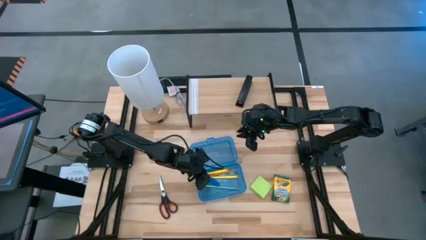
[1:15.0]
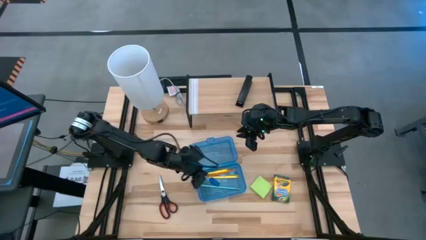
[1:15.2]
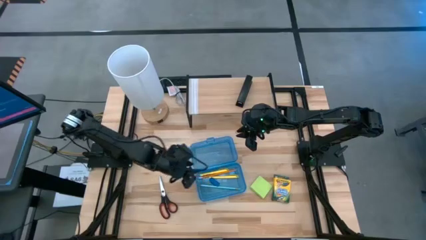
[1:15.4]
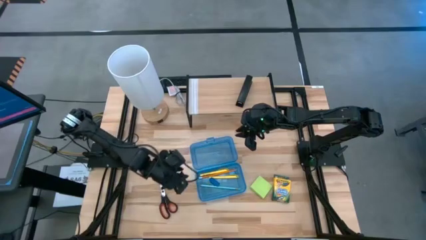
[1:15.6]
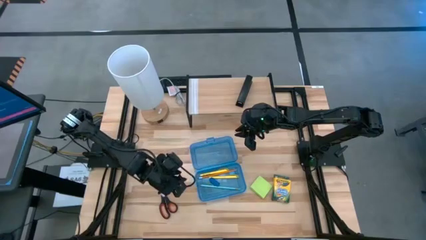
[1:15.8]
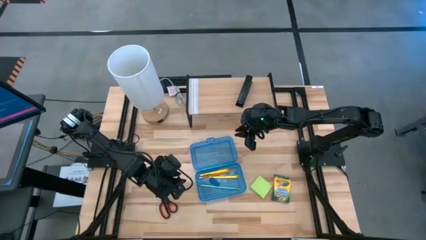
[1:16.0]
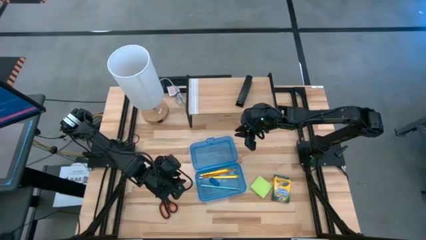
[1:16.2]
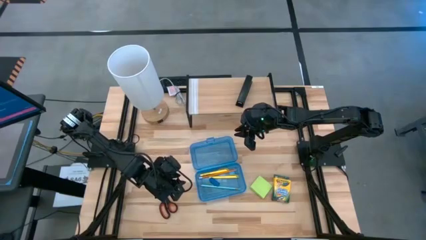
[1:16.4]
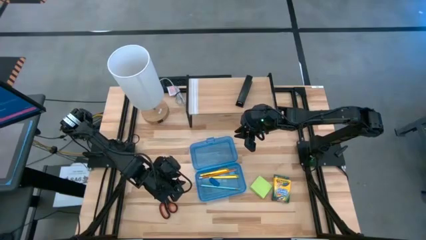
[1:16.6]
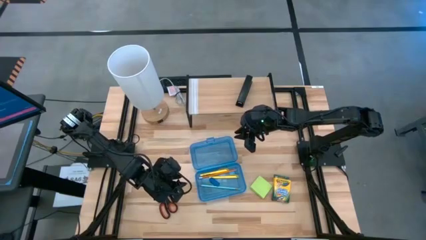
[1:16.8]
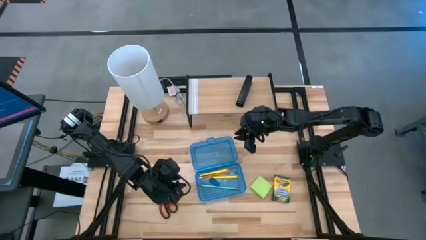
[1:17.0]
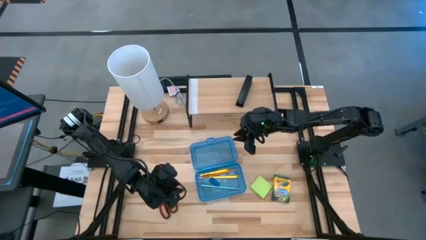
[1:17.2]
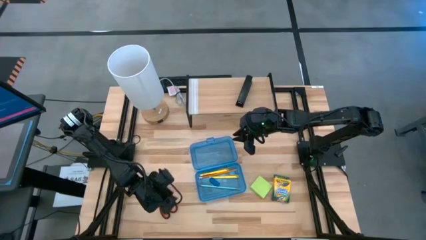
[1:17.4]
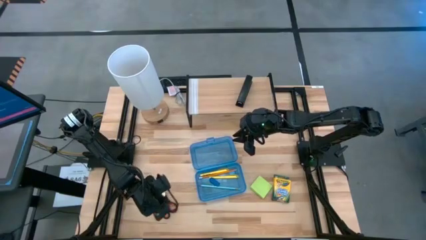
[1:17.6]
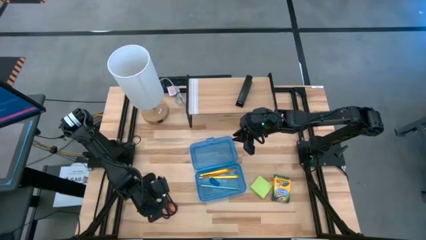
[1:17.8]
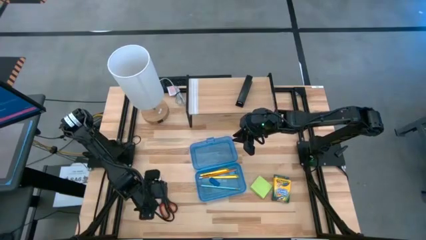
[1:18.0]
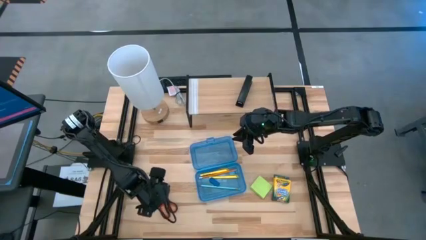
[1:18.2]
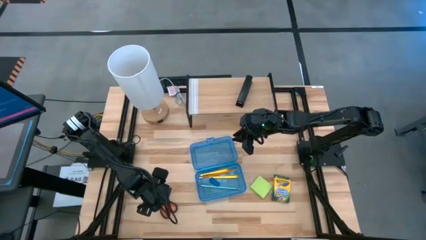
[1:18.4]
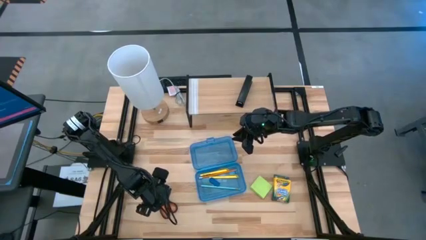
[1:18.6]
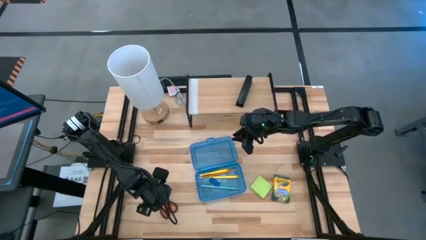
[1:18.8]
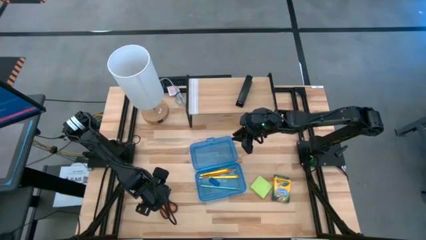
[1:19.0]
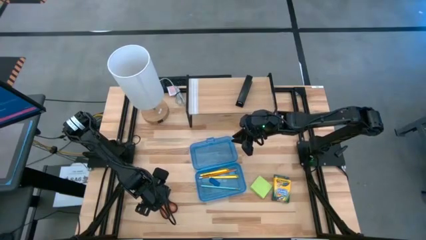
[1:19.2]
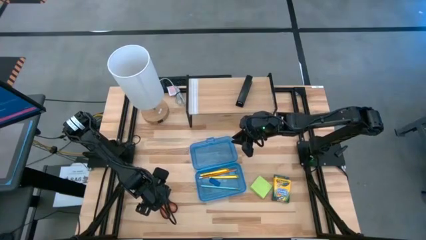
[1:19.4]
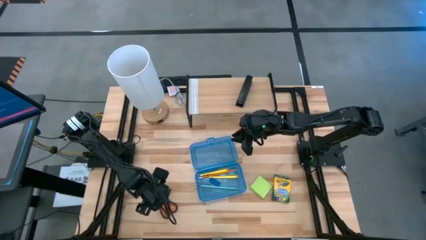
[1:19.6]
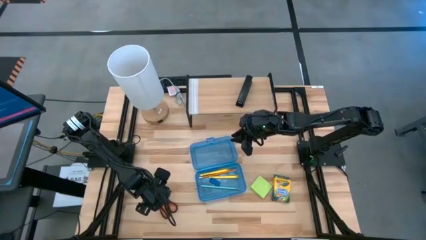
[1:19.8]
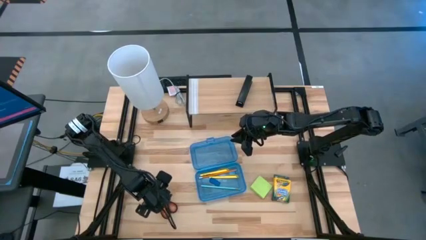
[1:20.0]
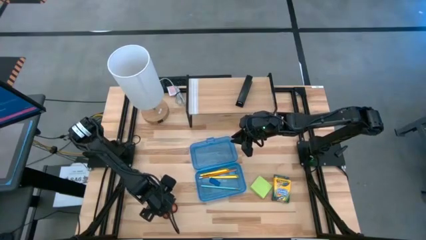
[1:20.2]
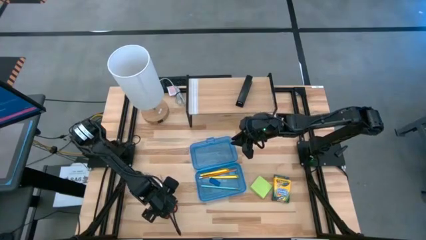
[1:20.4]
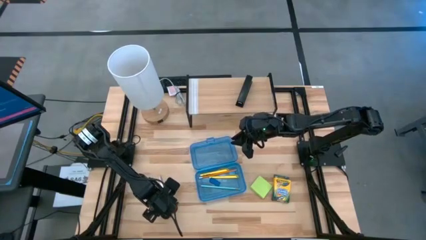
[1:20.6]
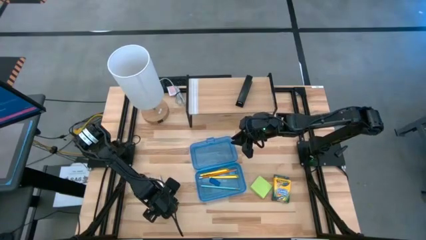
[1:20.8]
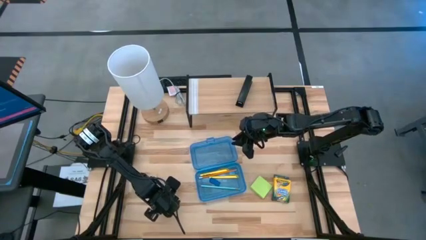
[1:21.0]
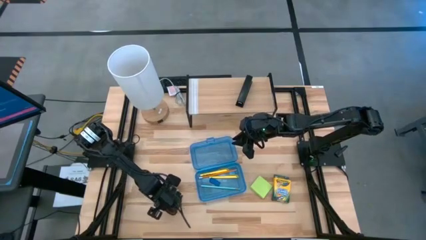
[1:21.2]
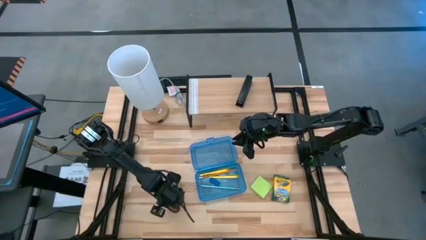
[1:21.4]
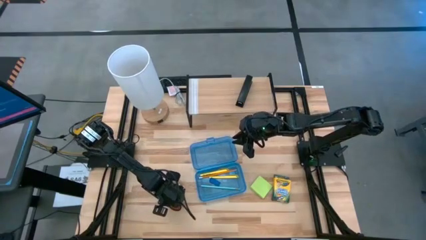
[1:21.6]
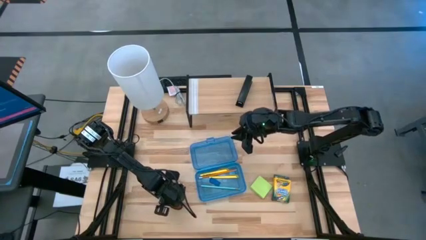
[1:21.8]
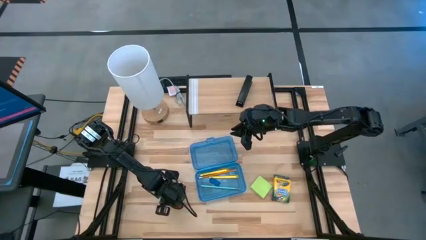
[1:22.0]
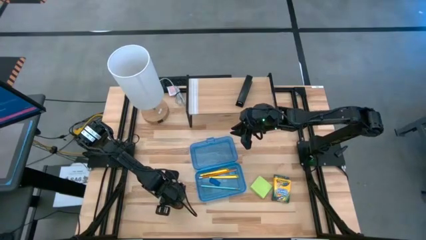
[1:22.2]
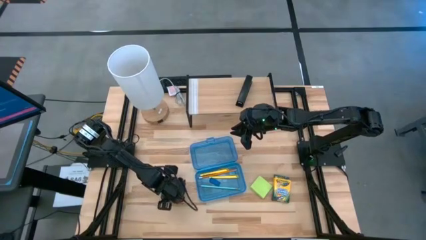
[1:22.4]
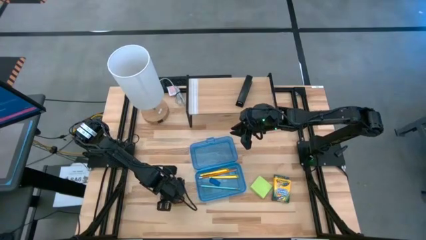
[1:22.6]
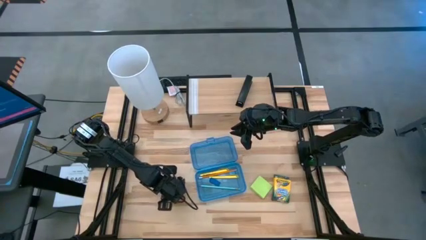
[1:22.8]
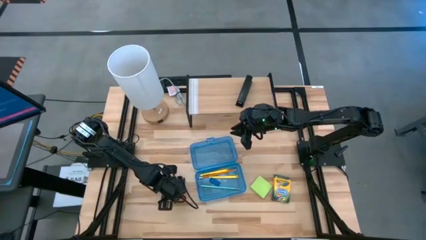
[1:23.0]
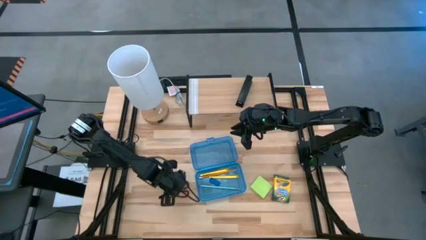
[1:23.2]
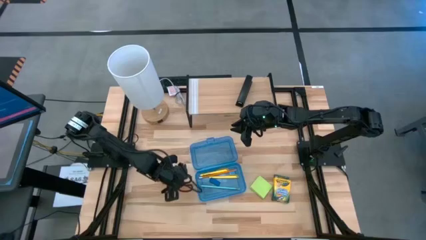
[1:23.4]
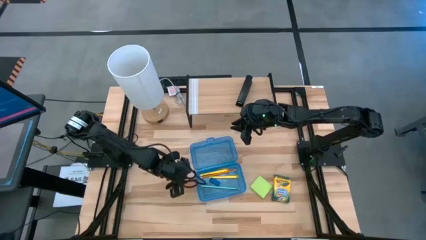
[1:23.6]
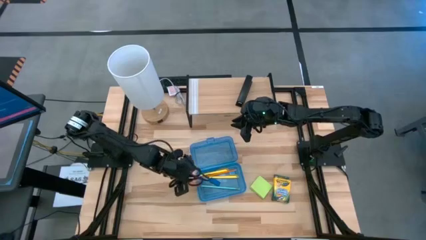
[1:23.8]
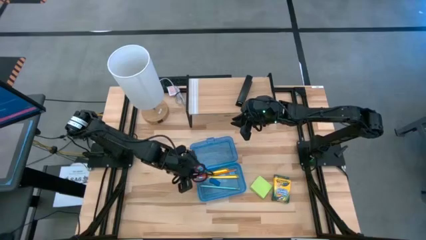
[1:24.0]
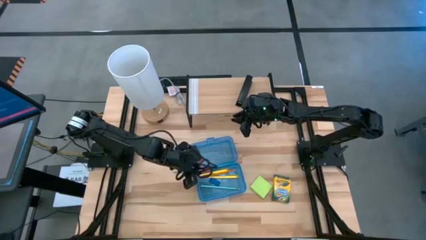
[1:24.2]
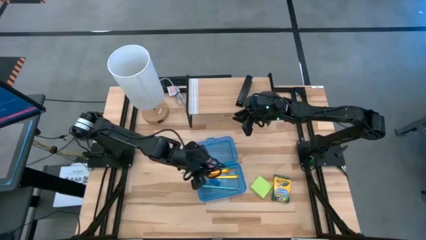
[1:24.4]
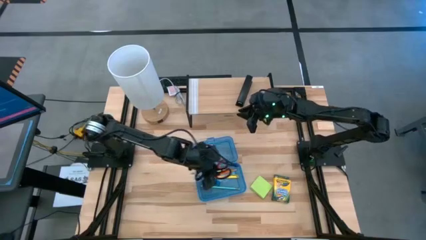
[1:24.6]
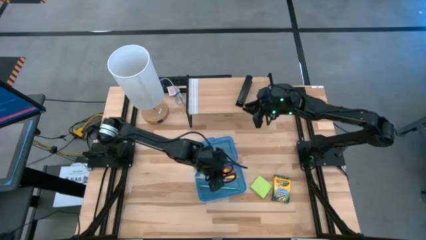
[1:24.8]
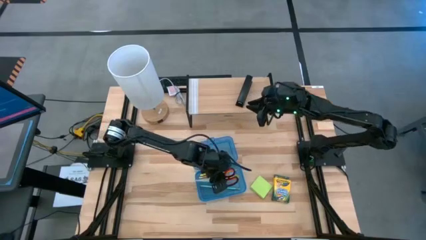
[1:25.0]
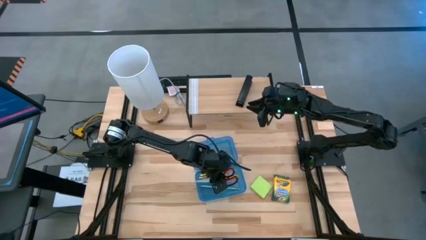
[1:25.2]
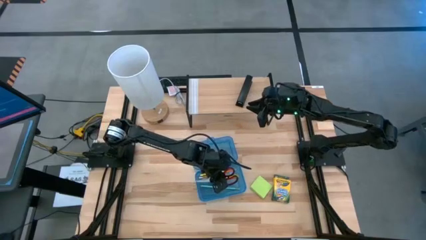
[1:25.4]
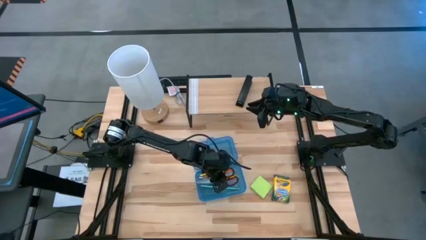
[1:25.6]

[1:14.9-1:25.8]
Task: Pack school essentials
Put the black and silver scissors into the blue supply box

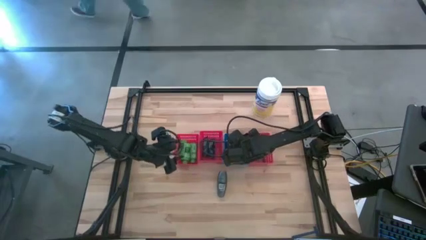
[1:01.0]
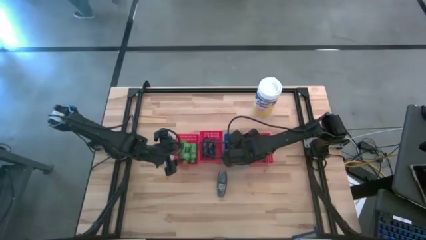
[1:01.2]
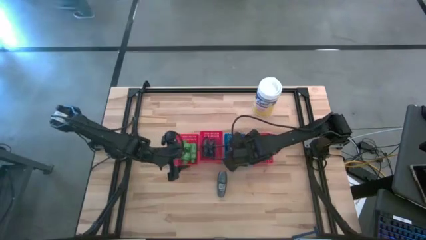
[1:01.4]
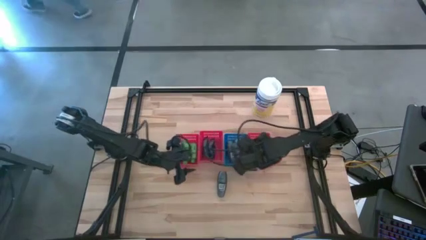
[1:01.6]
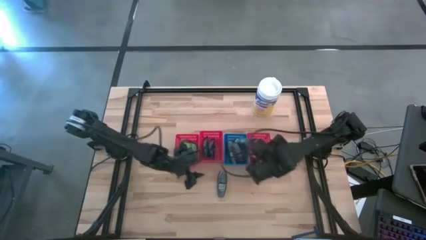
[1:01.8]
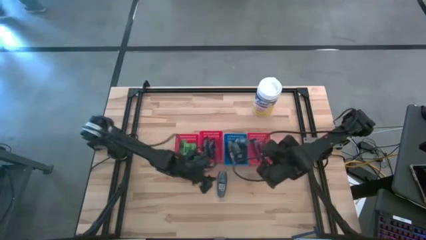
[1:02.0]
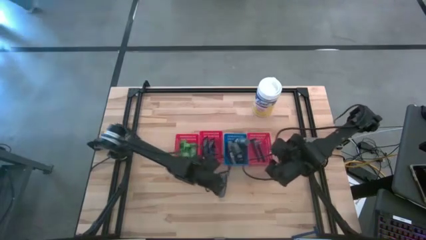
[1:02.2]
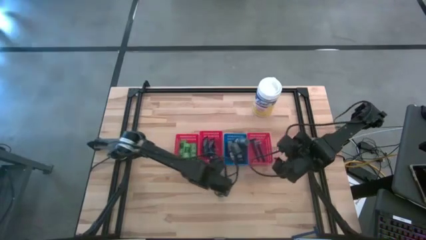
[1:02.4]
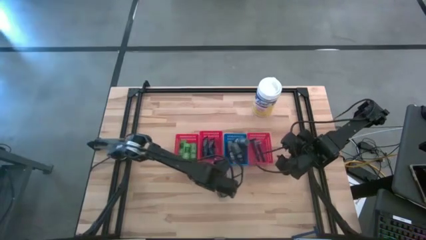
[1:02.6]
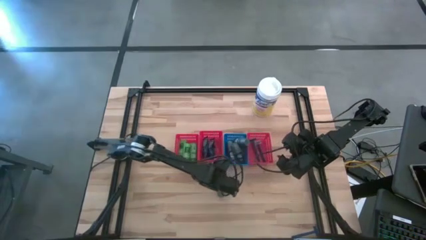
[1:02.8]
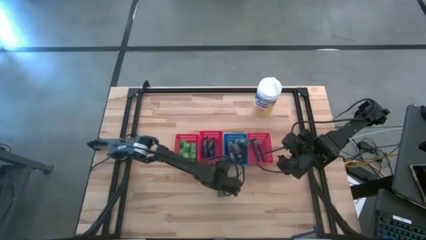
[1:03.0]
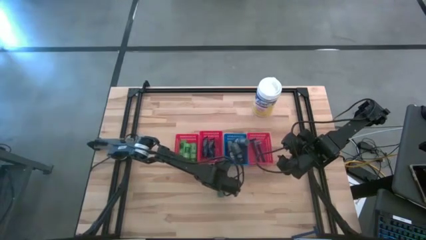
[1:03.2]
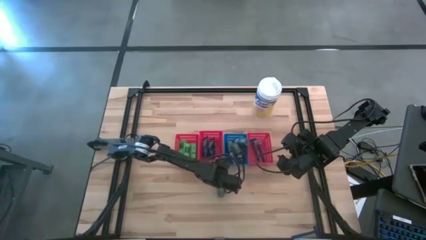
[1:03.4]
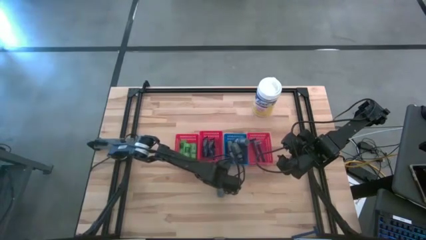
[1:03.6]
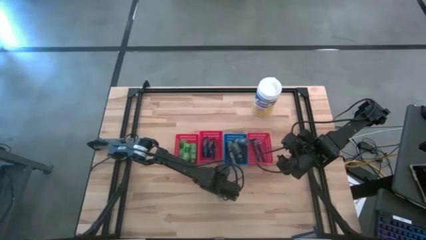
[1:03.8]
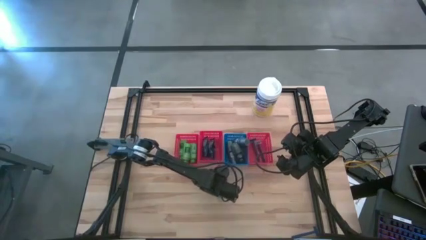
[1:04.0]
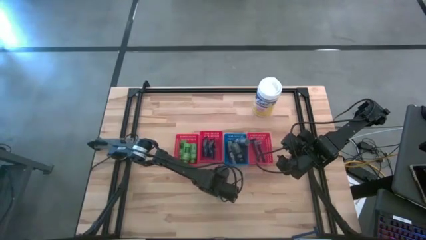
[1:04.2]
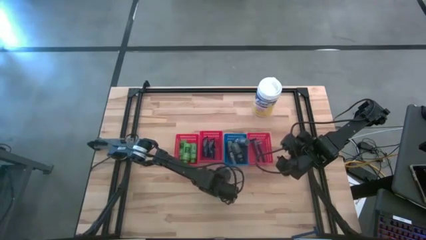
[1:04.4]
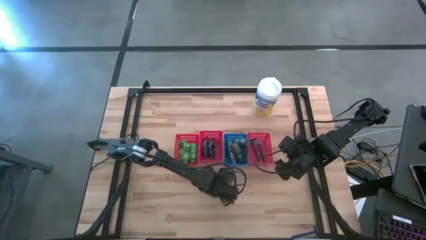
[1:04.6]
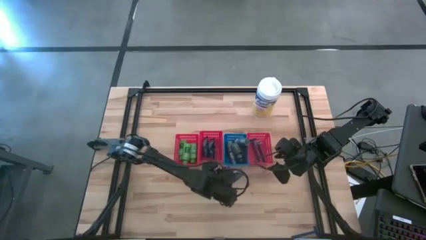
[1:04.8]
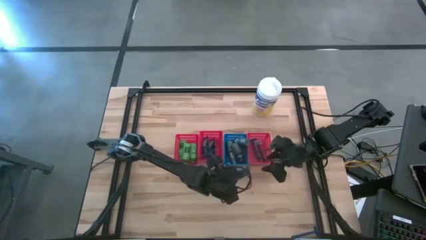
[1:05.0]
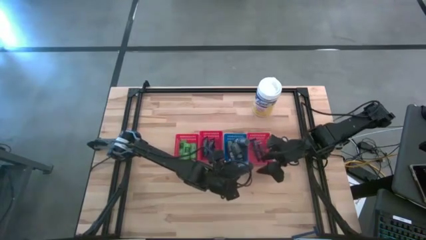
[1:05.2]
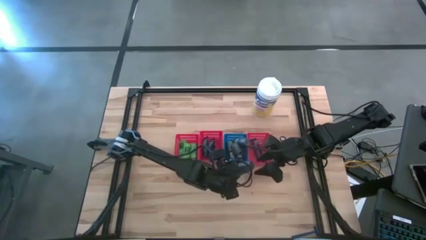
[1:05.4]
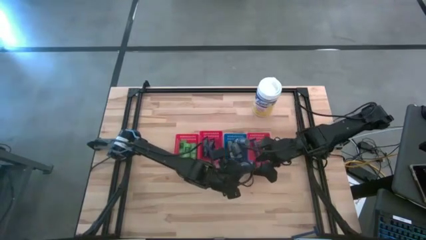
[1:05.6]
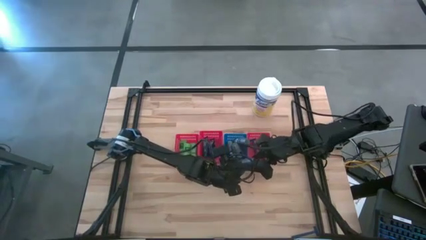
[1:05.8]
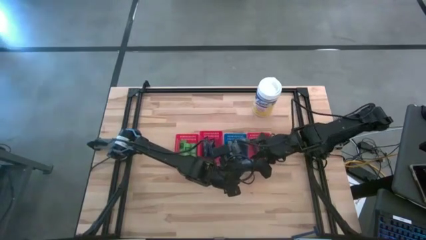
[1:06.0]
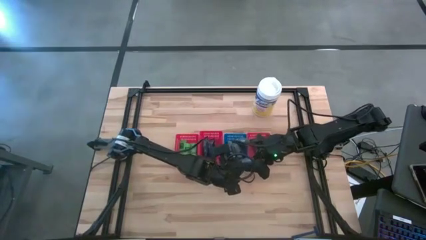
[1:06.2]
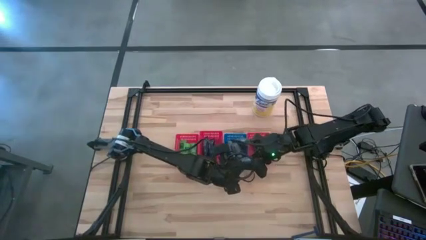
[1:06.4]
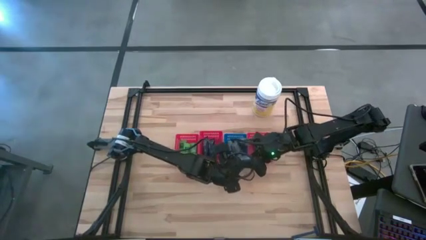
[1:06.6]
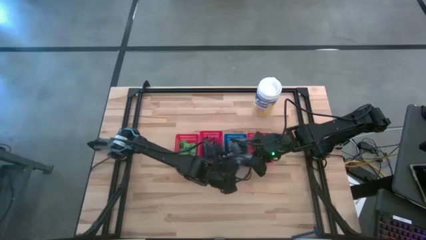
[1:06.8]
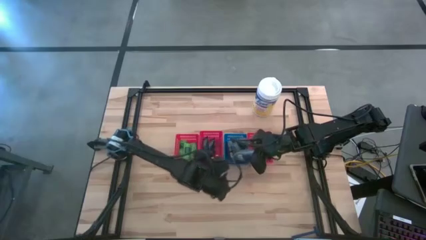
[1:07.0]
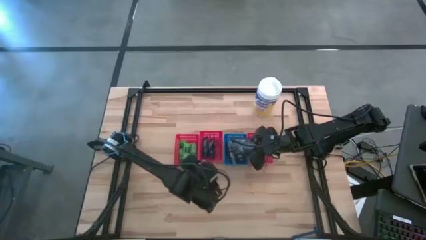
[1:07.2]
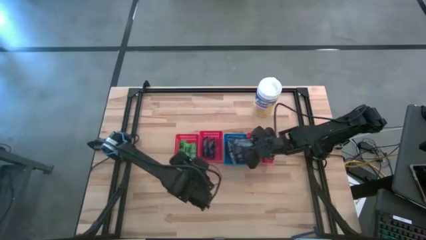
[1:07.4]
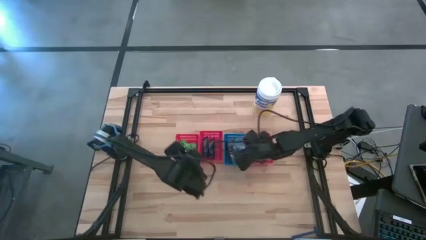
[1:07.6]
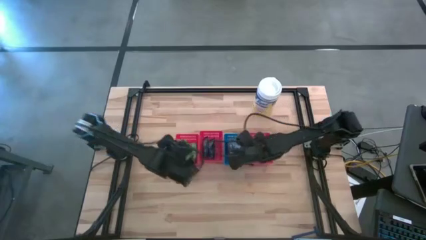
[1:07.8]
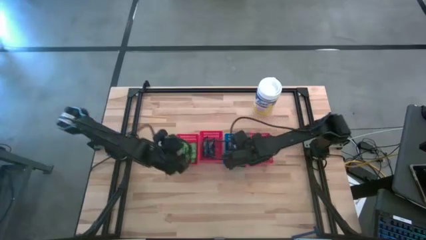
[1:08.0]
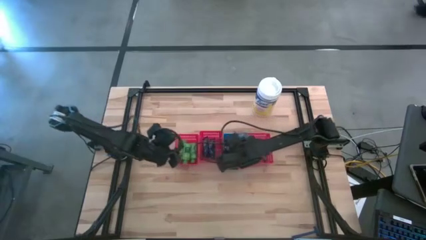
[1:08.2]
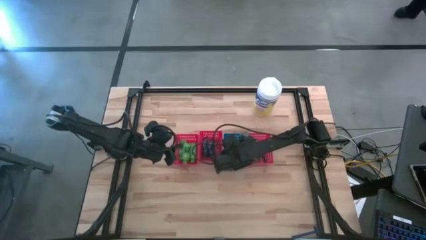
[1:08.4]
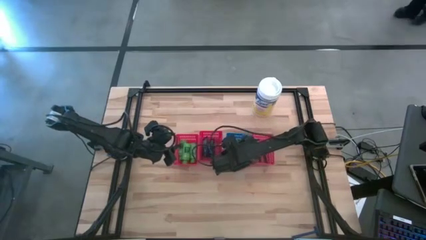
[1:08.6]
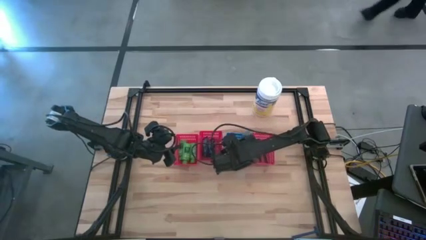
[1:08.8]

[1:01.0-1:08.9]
Task: Pick & Place Travel size toiletries
Put the deodorant into the blue bin
